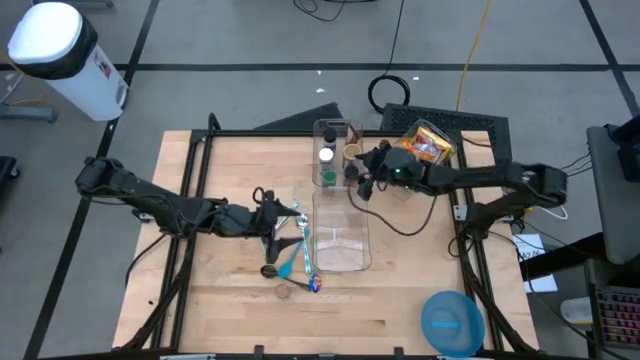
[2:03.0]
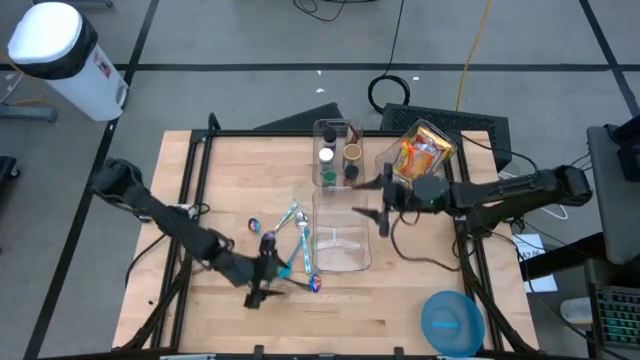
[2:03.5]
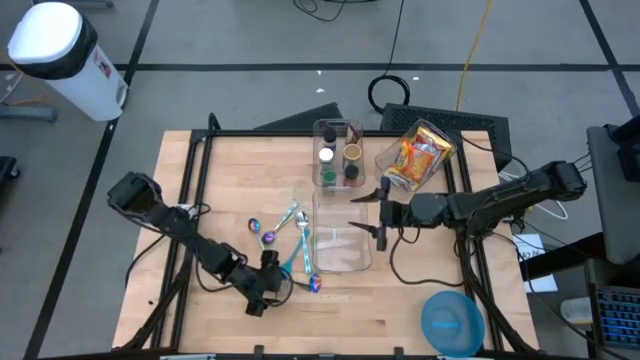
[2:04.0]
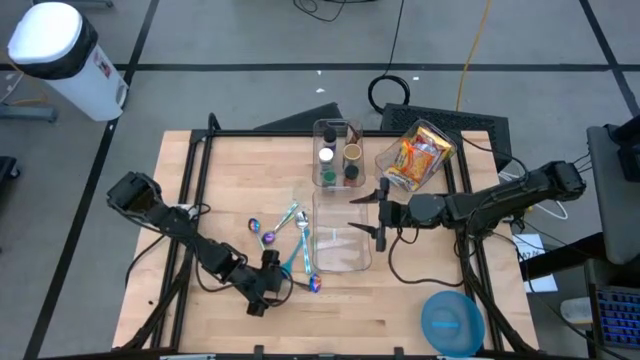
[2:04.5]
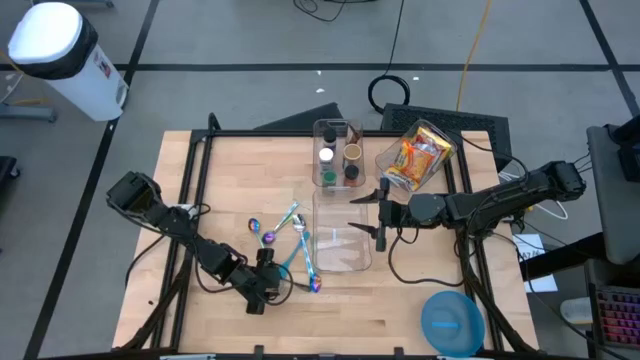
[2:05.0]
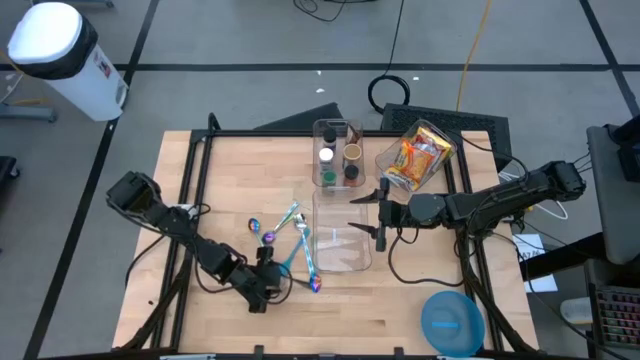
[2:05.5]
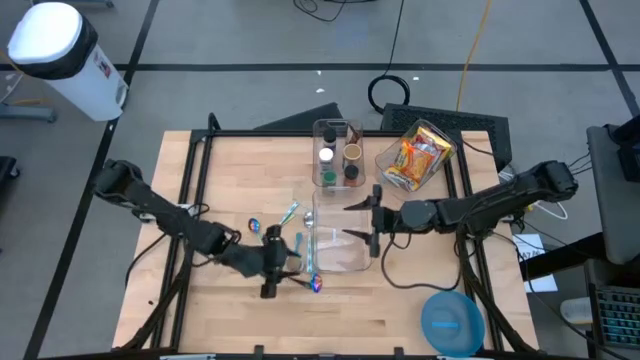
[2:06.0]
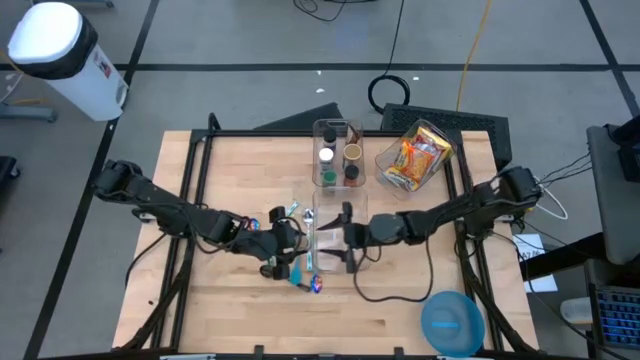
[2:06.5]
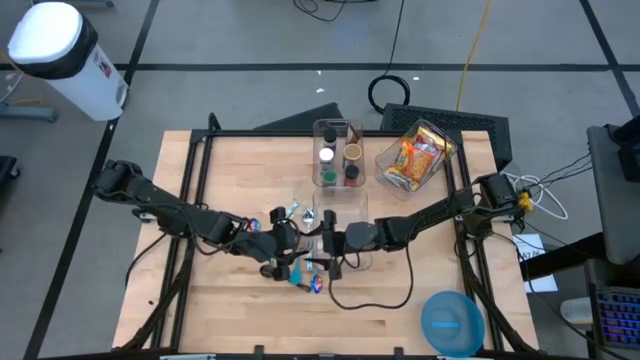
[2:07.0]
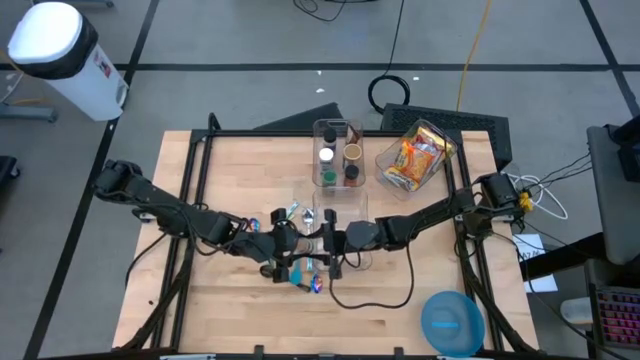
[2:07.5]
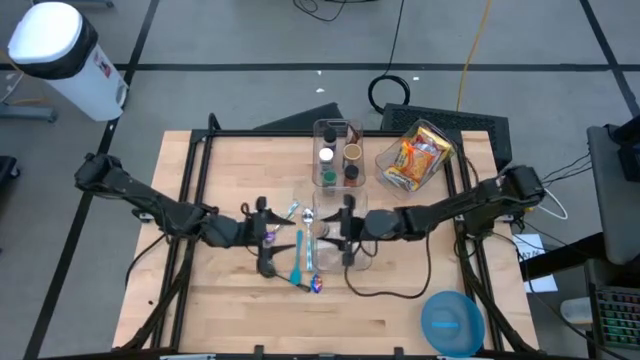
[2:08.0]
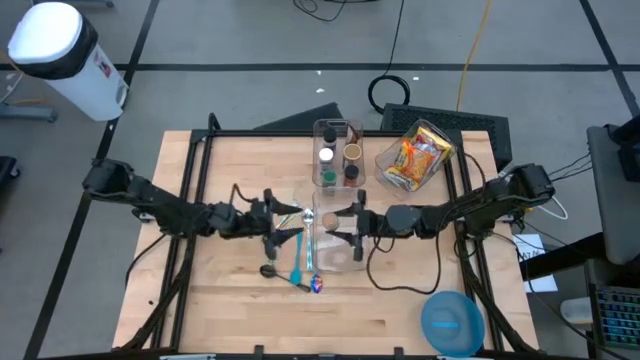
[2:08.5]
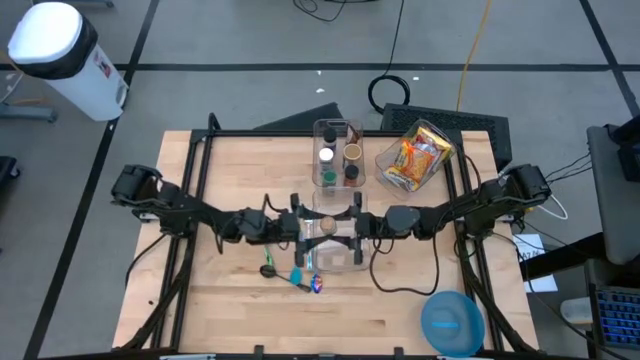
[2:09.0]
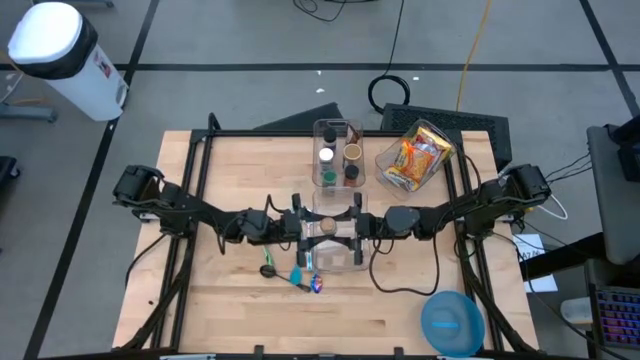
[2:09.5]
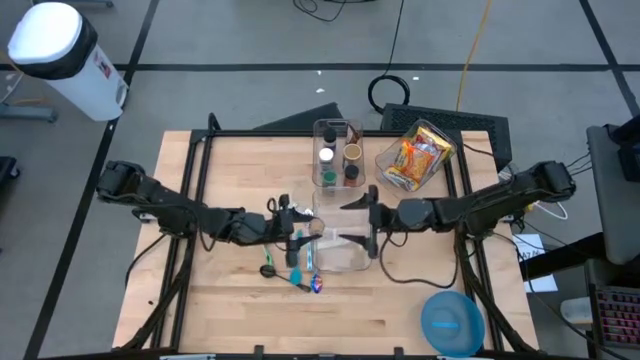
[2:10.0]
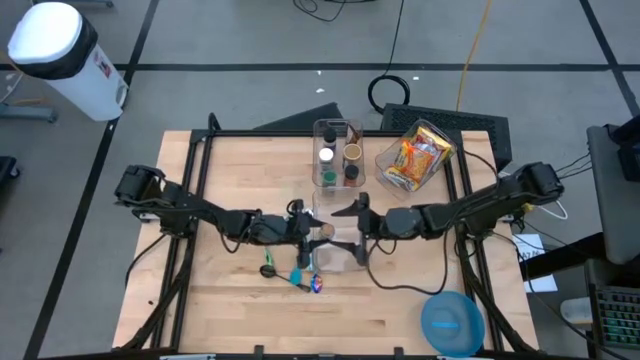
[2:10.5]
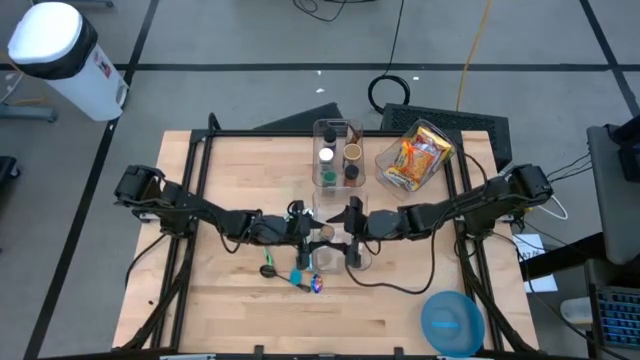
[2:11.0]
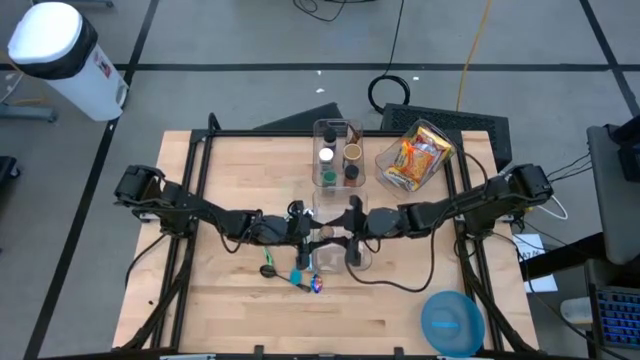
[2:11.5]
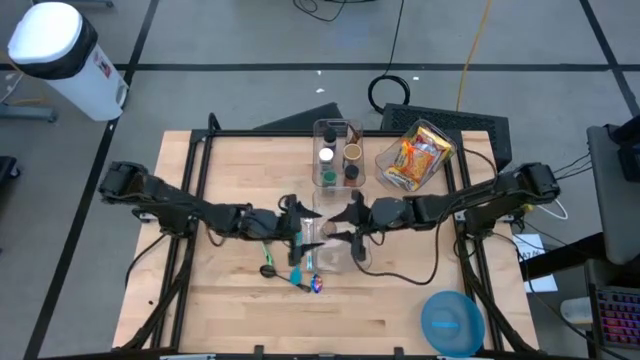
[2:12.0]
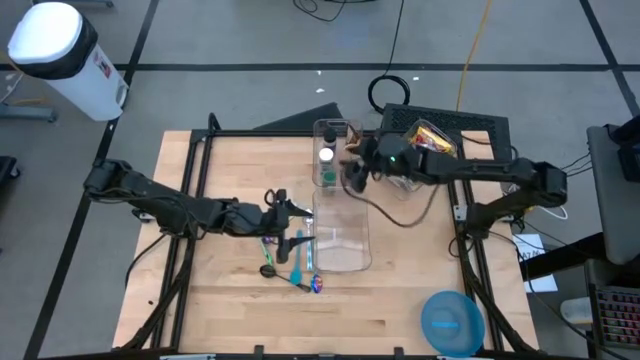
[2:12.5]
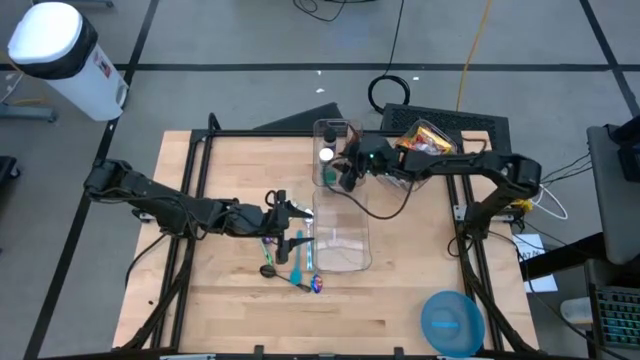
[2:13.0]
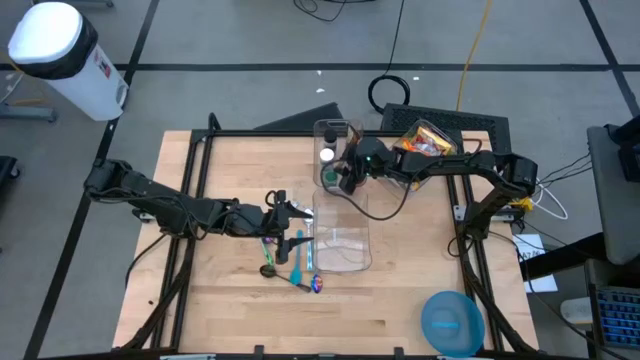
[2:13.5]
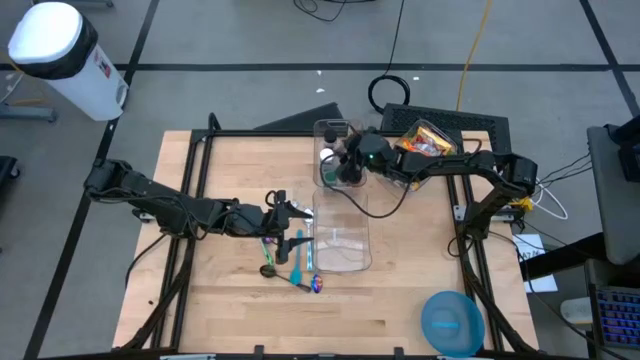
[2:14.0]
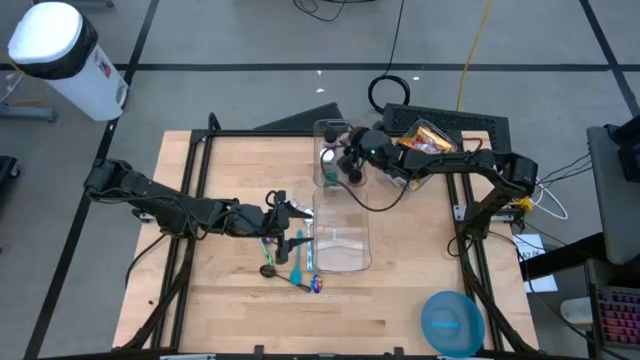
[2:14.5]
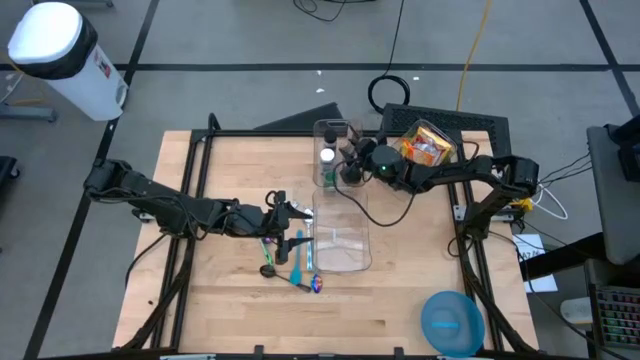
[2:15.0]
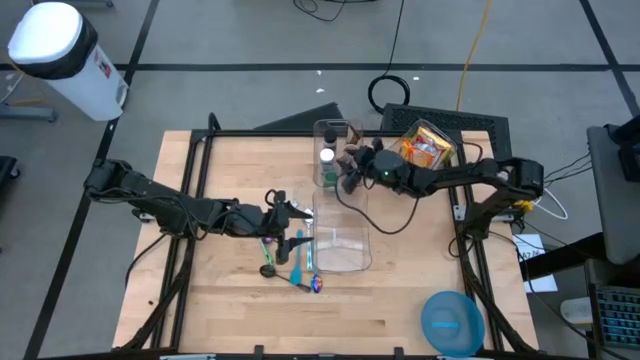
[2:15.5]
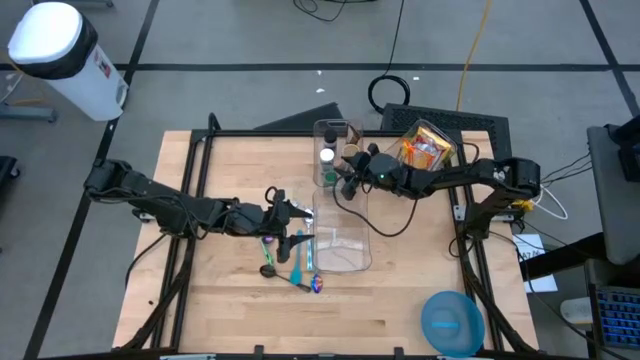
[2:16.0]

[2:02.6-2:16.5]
Task: Pick & Place Food Item
Put the brown spice bottle into the top left transparent bin

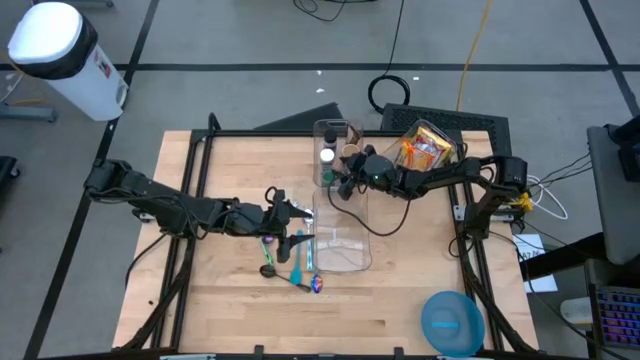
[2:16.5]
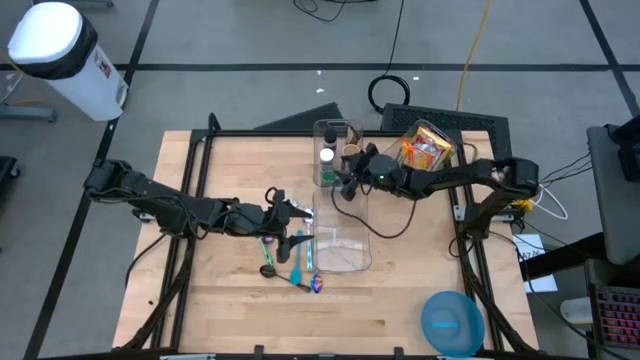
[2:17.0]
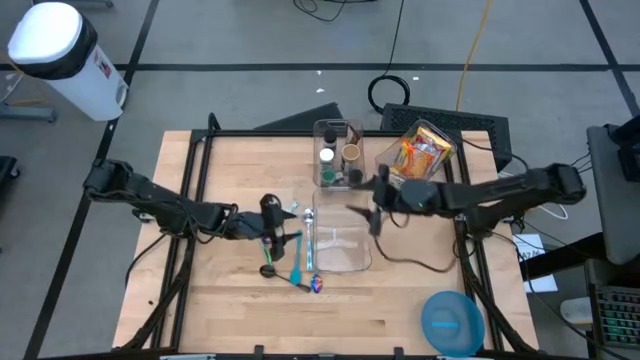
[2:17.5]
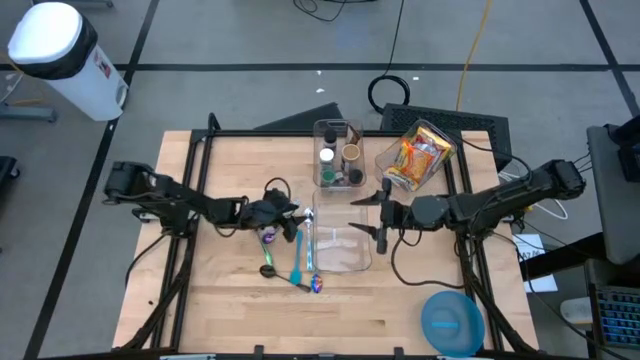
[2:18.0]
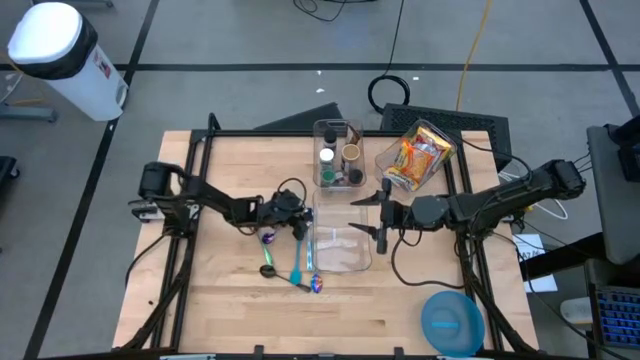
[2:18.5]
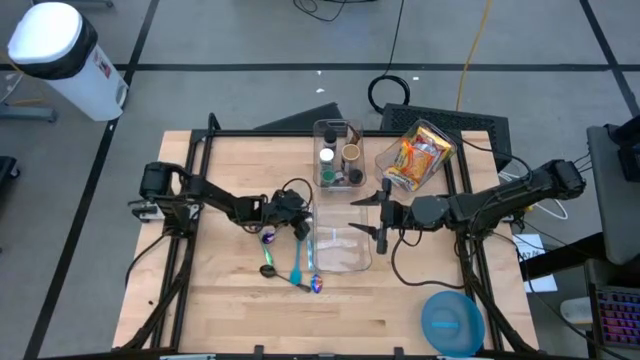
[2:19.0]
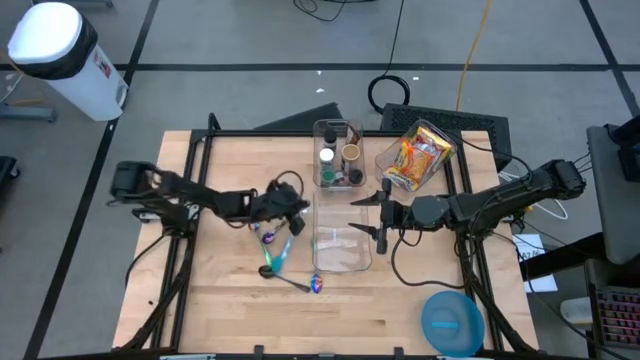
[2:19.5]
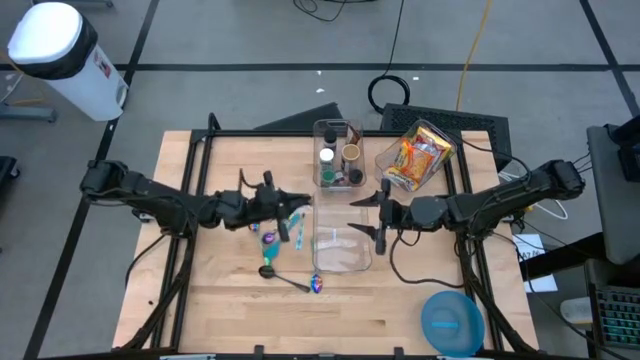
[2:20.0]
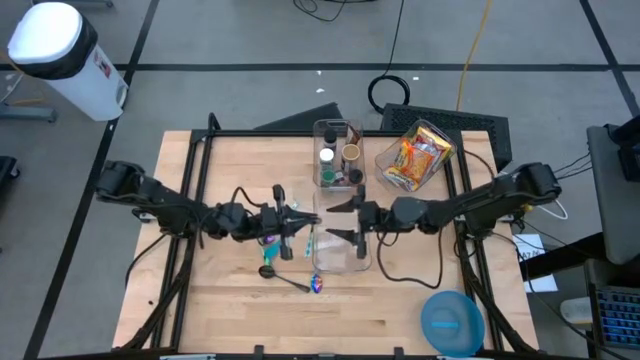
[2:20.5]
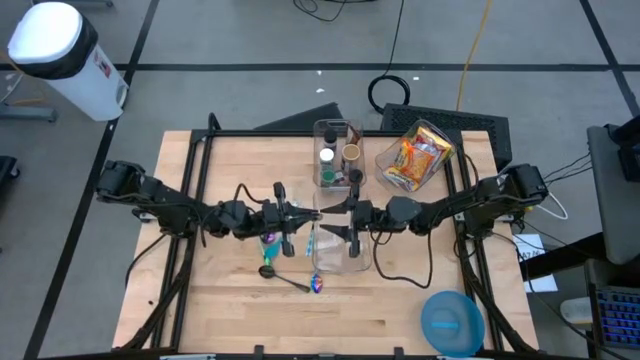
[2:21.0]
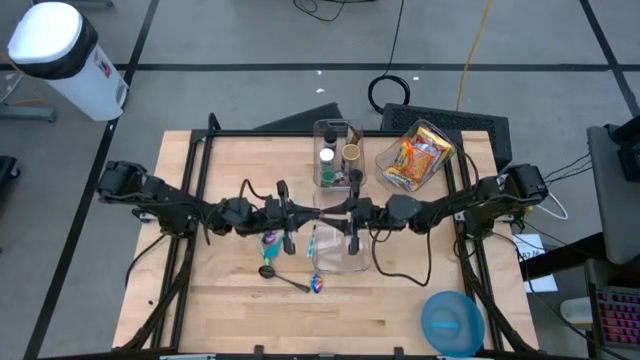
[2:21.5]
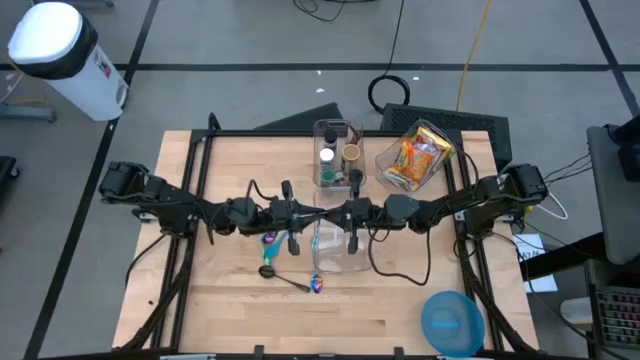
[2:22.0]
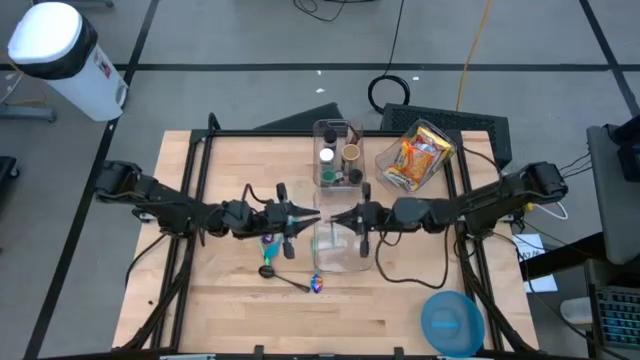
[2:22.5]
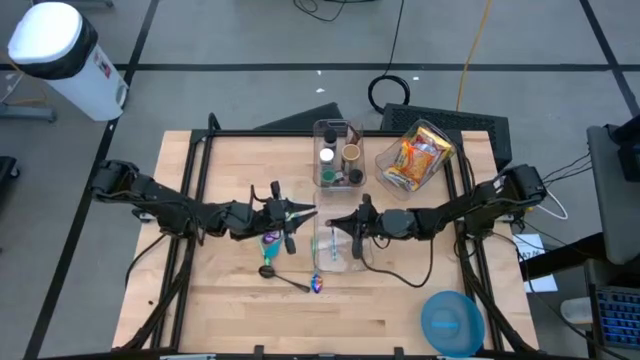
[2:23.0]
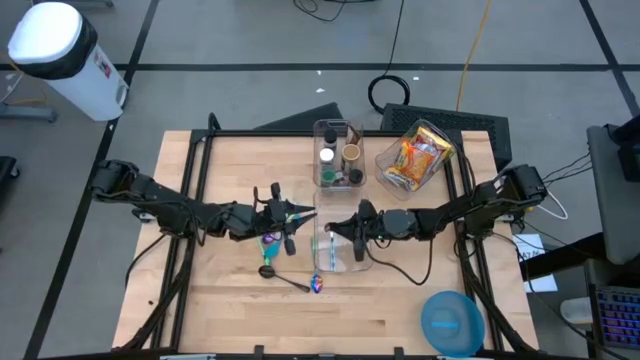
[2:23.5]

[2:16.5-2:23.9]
Put the right white and blue spoon into the bottom transparent bin

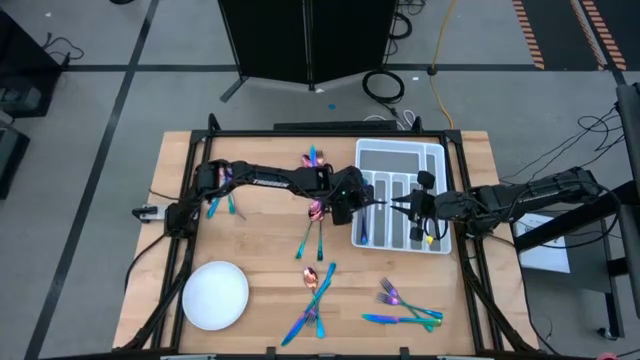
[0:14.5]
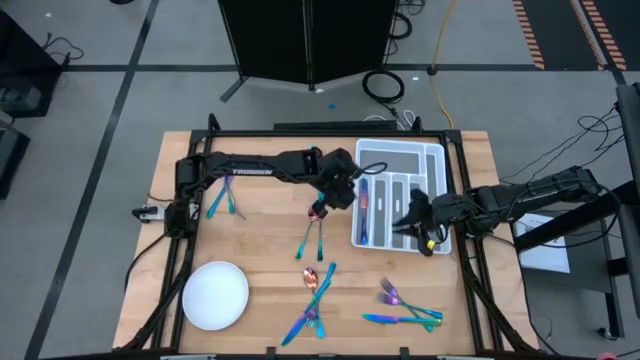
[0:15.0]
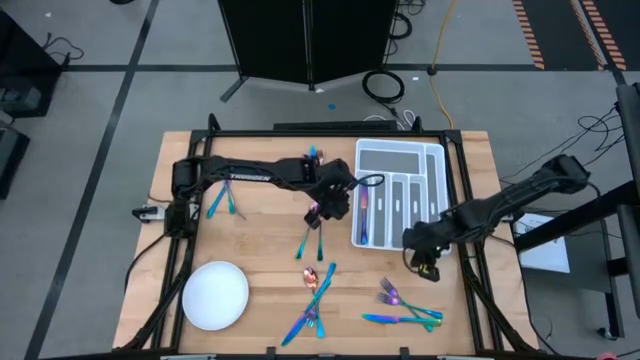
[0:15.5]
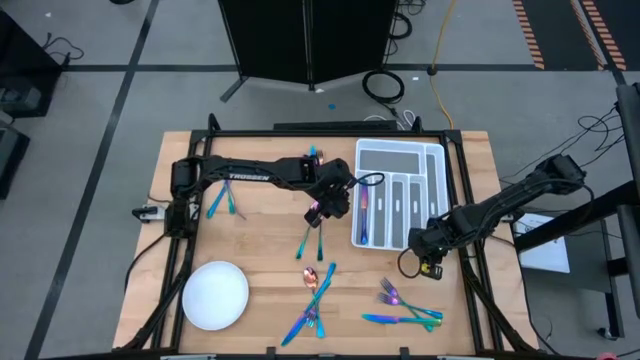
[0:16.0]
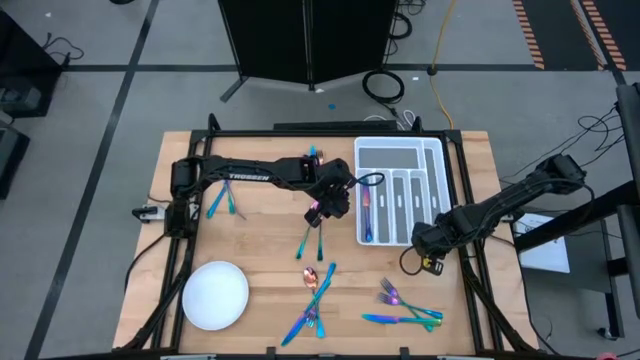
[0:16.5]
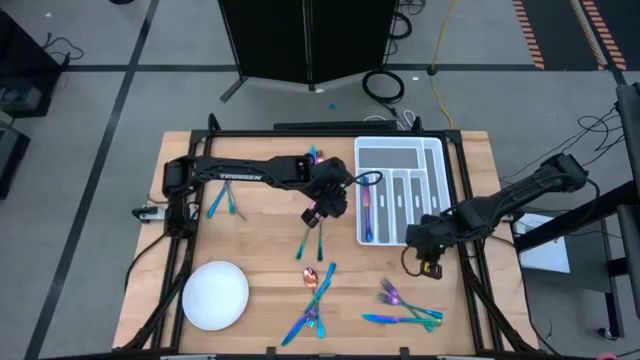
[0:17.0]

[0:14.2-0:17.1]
Task: Sort silverware
Adjust the utensil organizer
